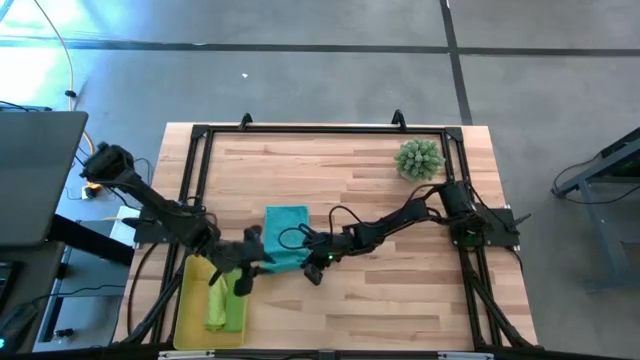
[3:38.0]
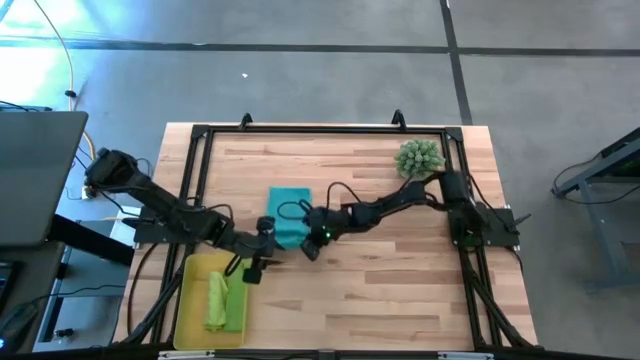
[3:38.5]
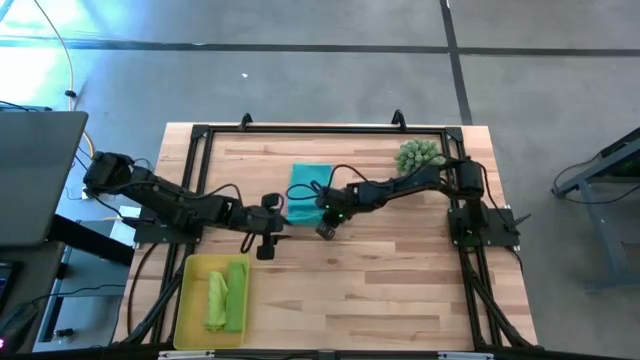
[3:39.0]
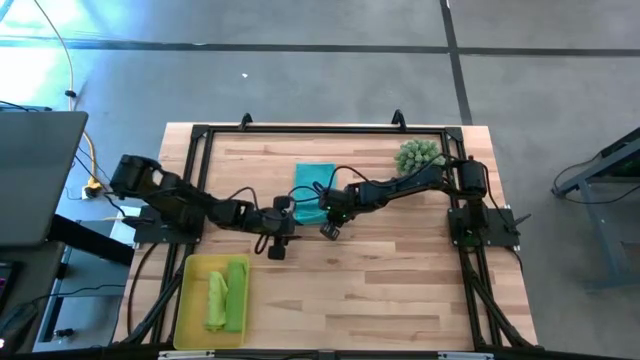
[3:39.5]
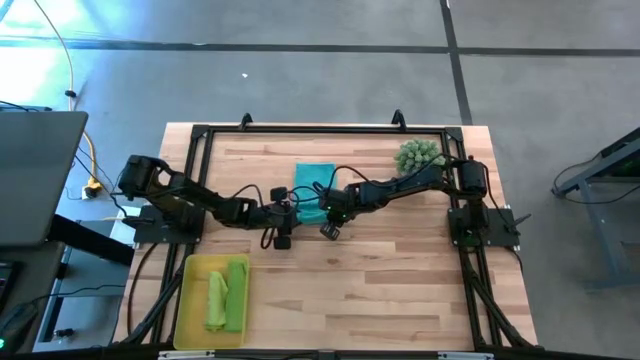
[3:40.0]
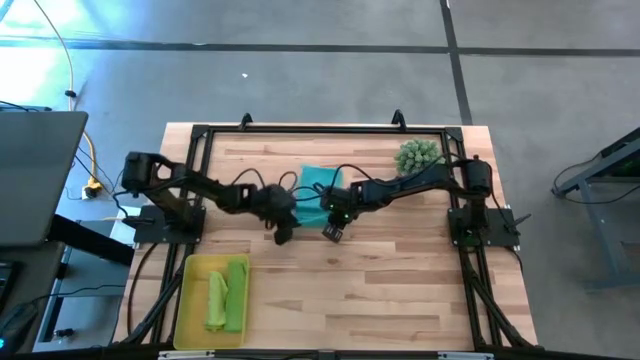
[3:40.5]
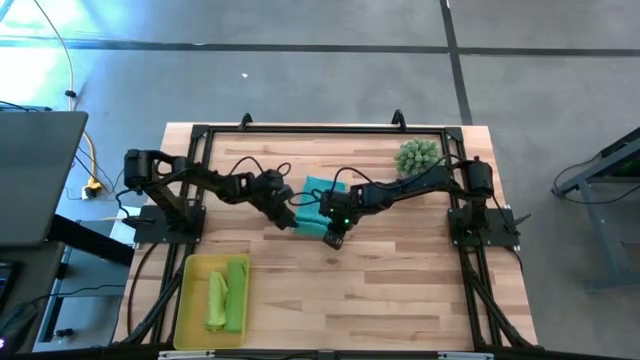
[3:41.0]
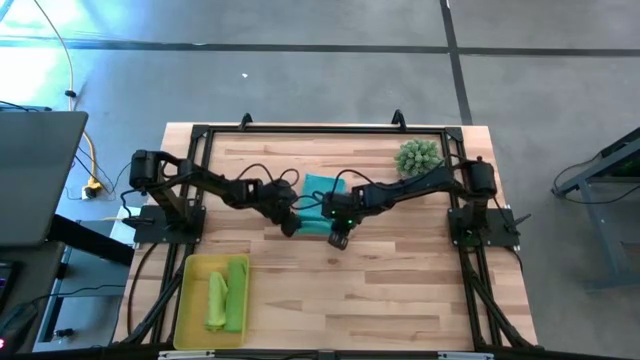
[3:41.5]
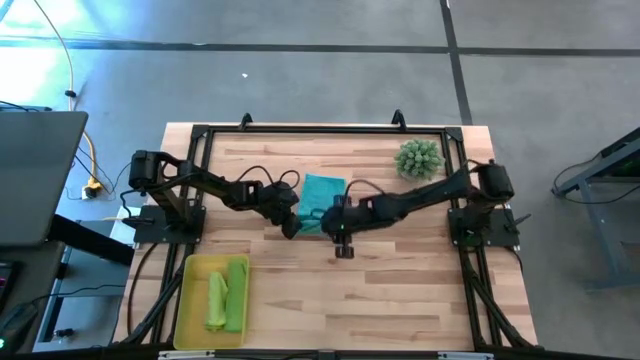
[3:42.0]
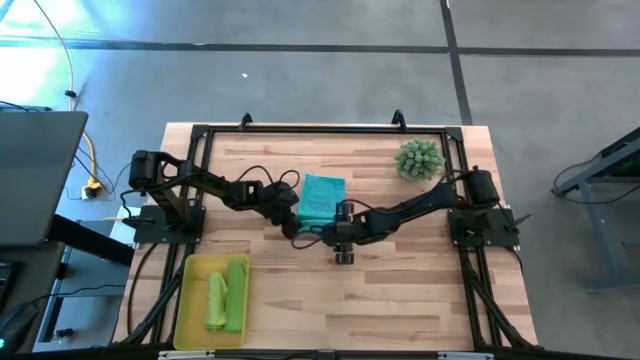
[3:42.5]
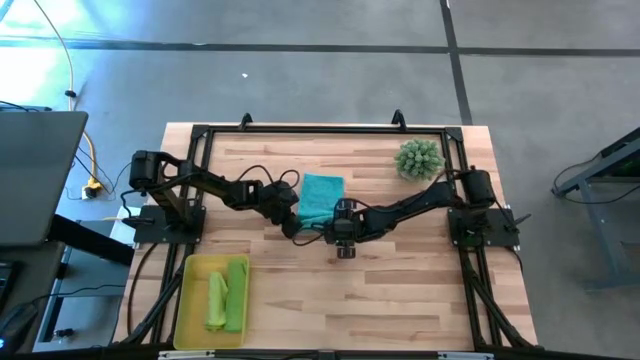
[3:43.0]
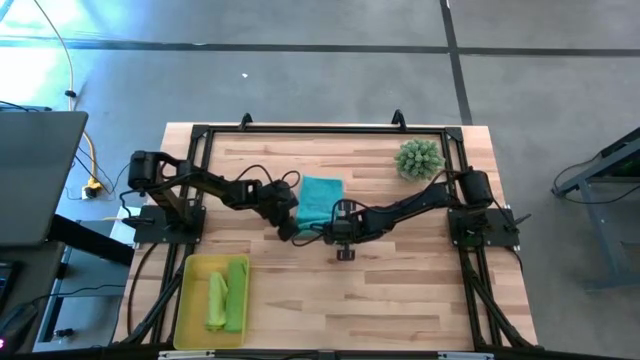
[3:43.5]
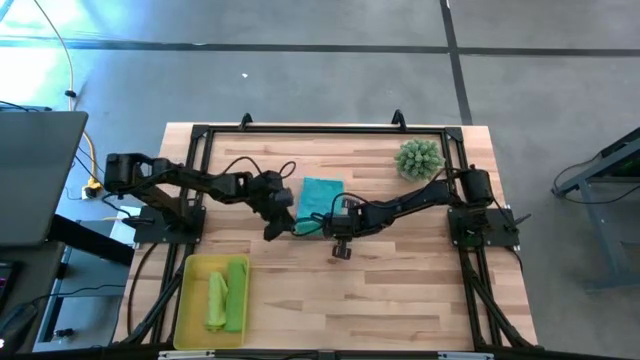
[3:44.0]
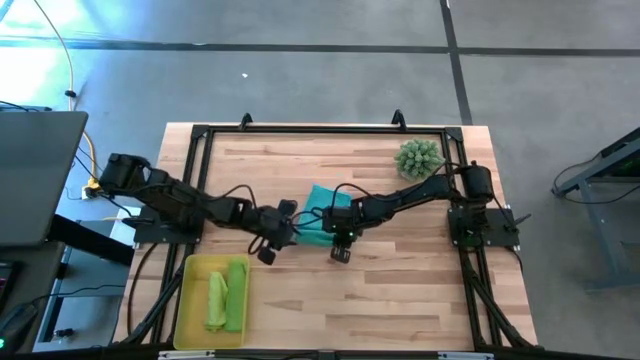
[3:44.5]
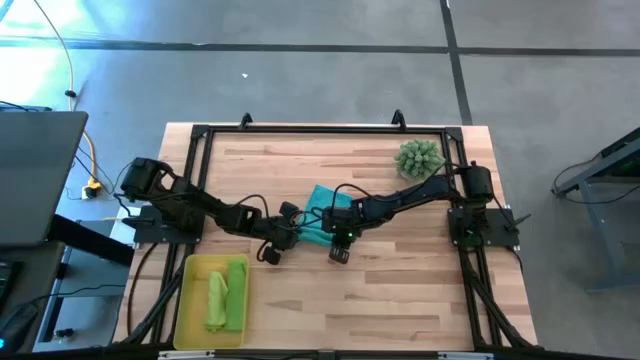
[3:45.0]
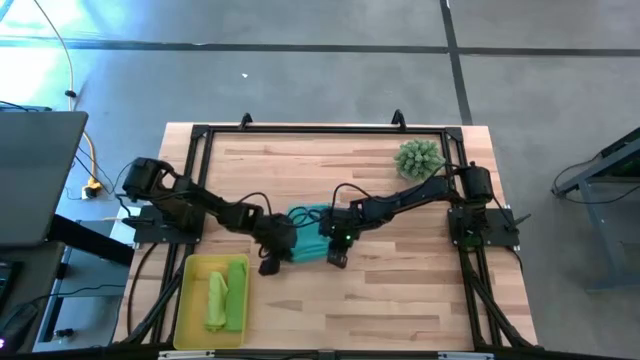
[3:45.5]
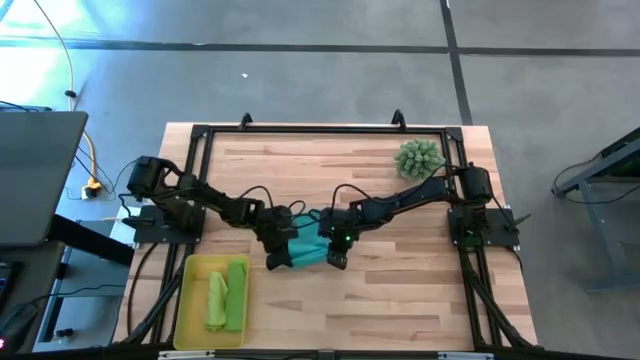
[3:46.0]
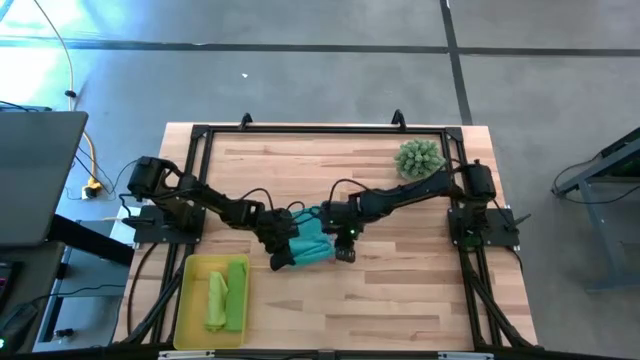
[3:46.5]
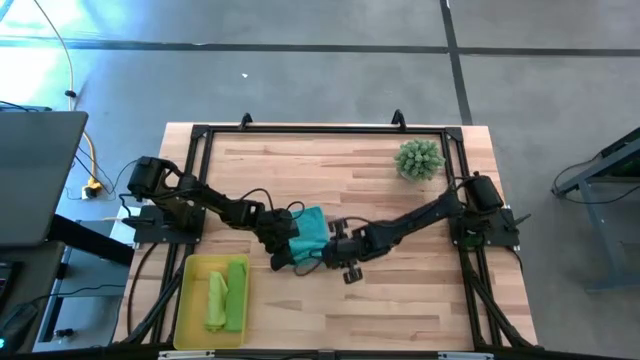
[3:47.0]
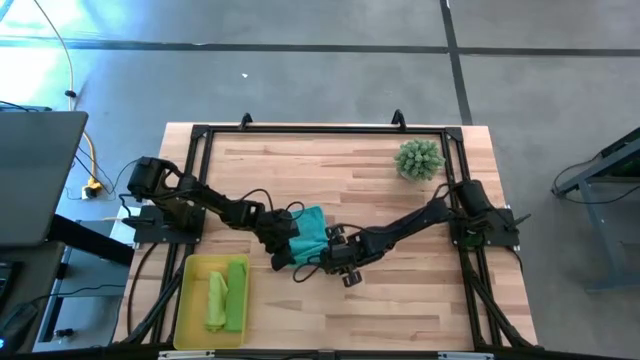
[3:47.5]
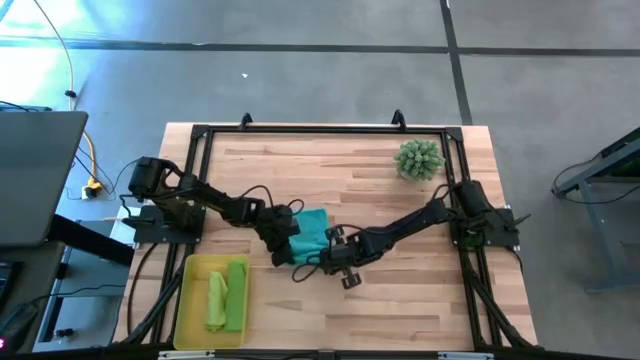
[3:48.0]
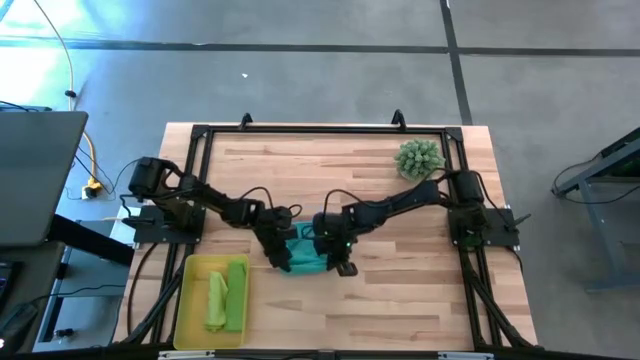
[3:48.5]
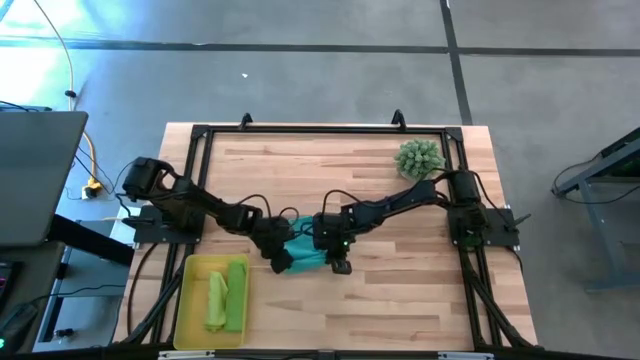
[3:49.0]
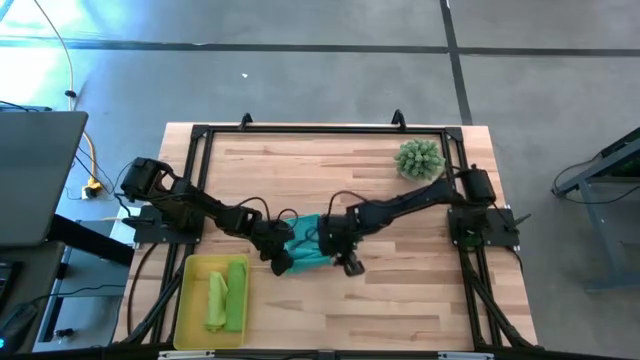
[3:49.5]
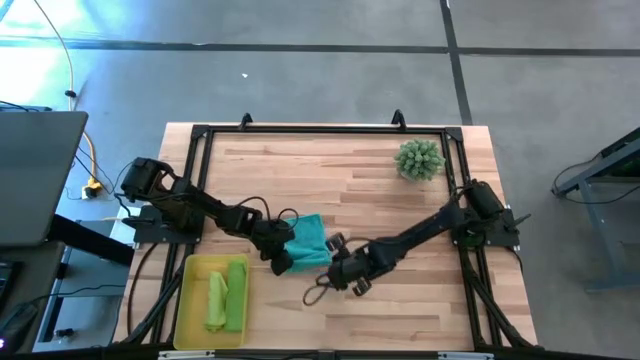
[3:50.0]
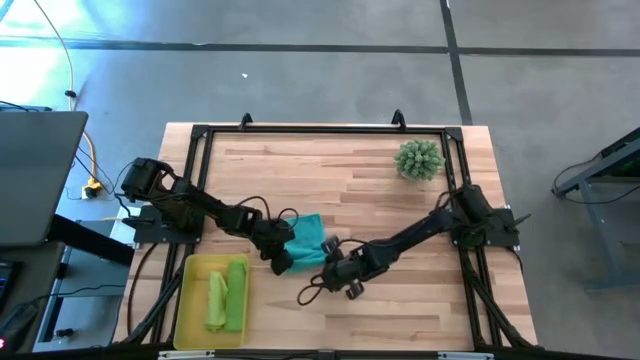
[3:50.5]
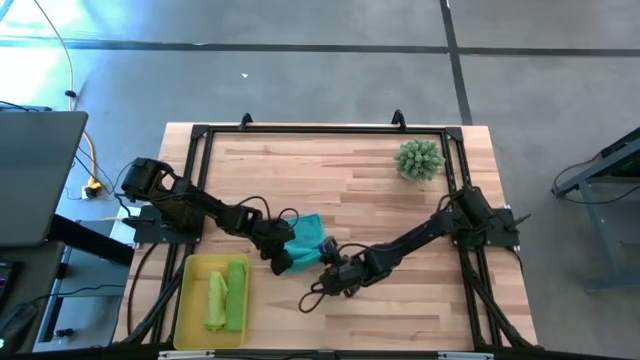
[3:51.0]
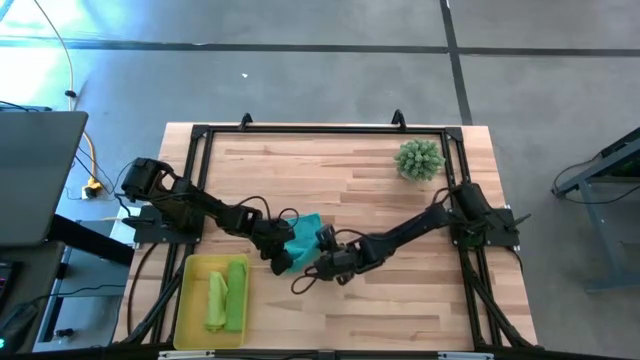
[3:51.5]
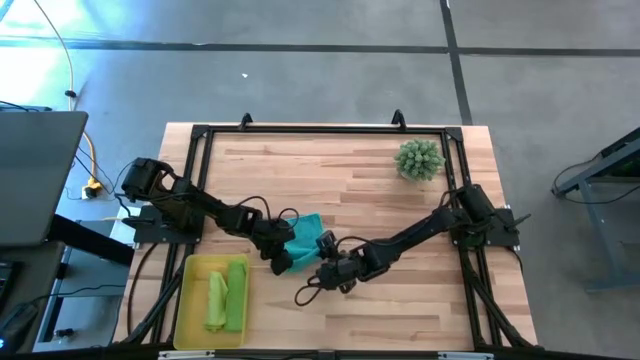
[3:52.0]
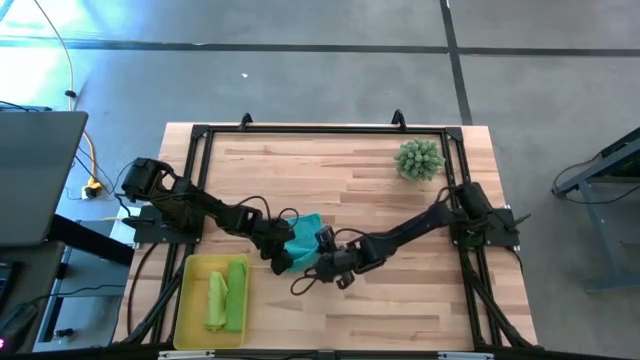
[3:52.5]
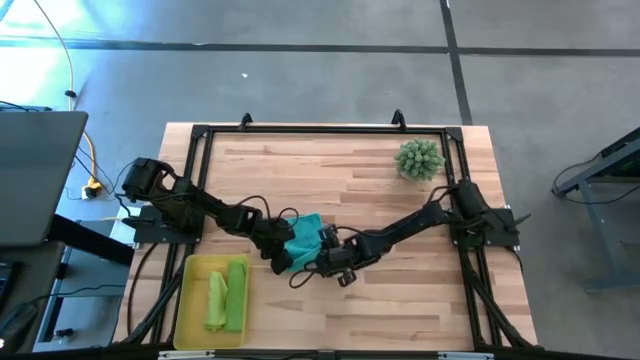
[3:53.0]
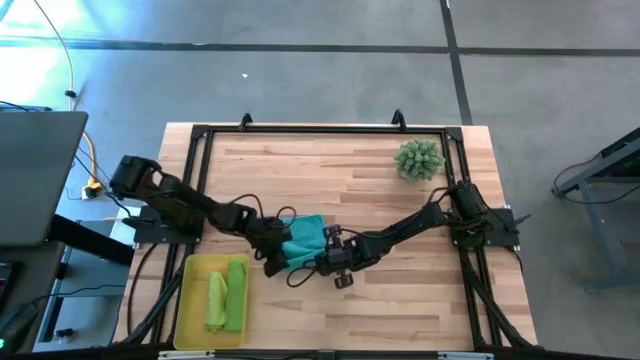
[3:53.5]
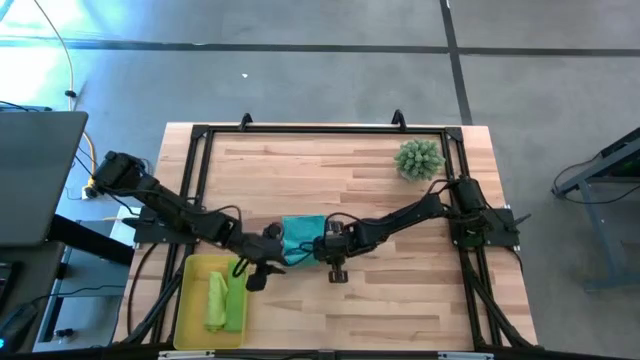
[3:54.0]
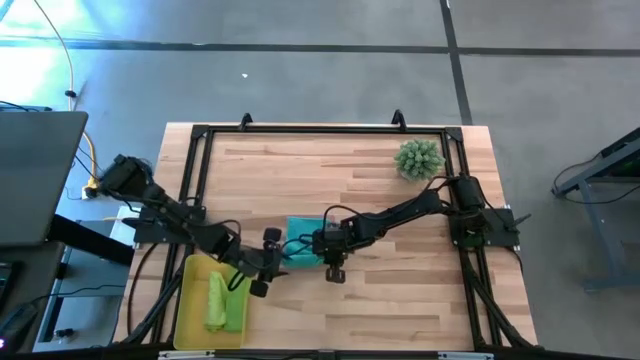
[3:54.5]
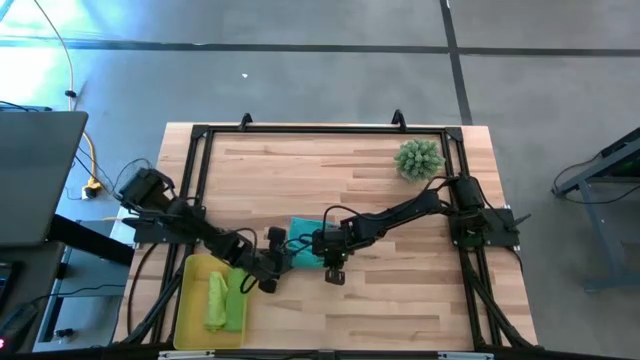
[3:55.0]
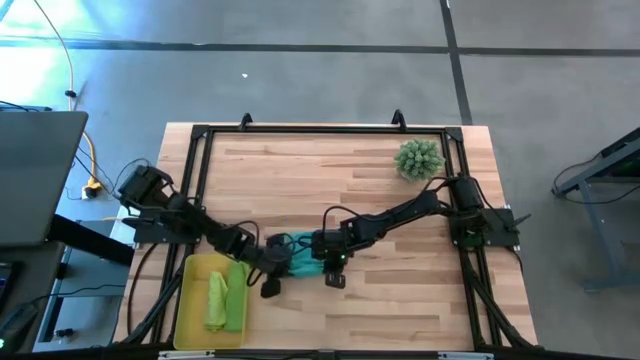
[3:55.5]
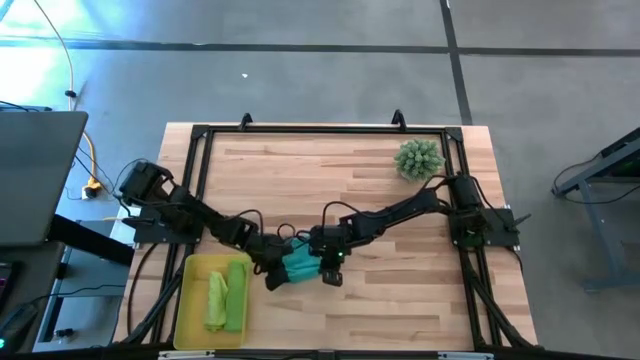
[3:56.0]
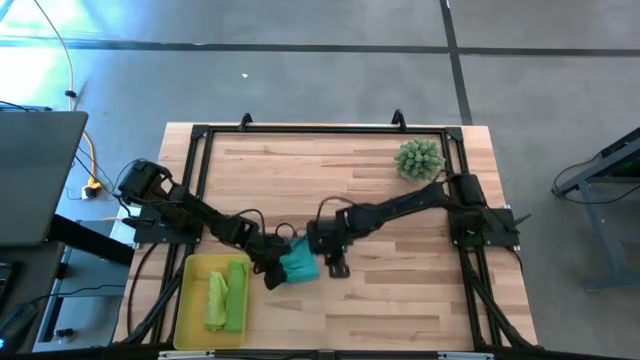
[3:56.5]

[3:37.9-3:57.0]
Task: Roll microfiber towels into tight, uniform cylinder then place into a basket
Roll the blue microfiber towel

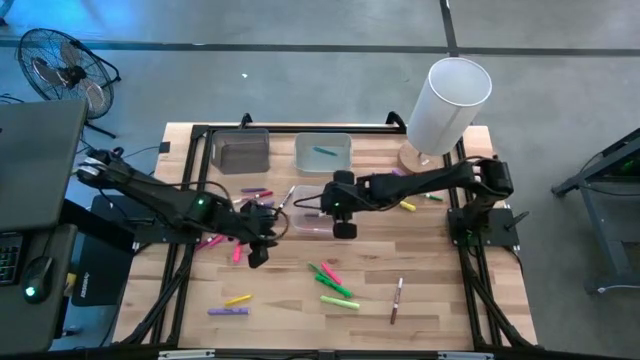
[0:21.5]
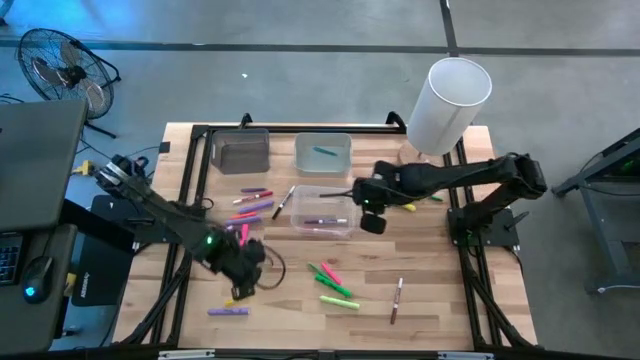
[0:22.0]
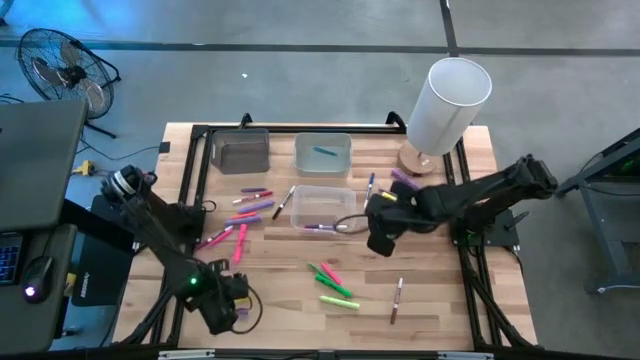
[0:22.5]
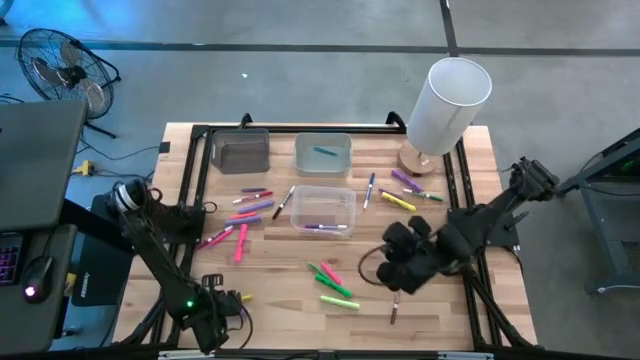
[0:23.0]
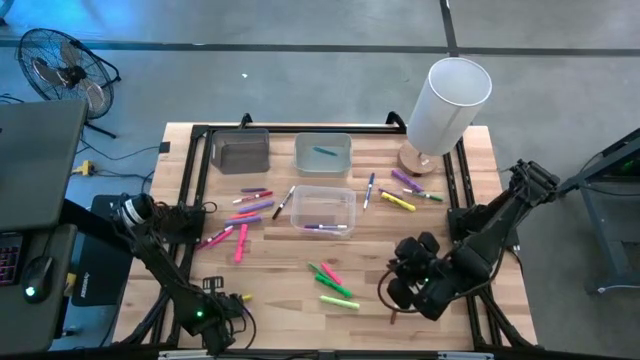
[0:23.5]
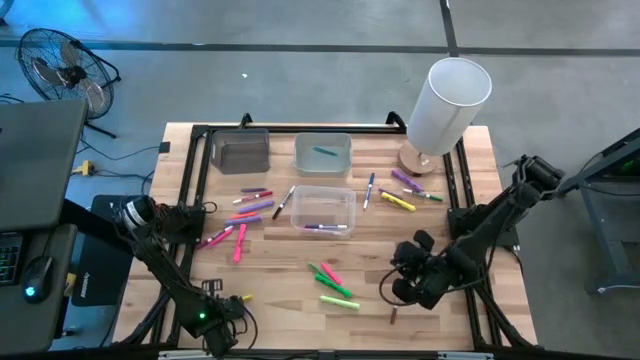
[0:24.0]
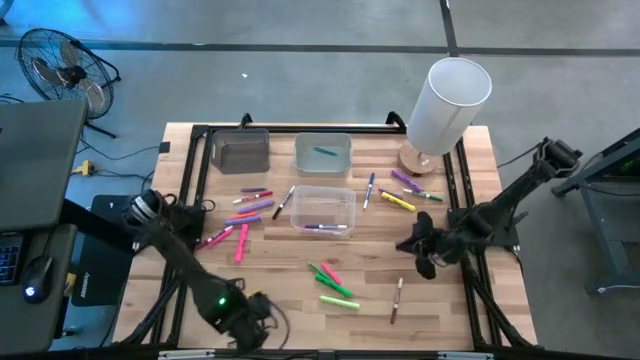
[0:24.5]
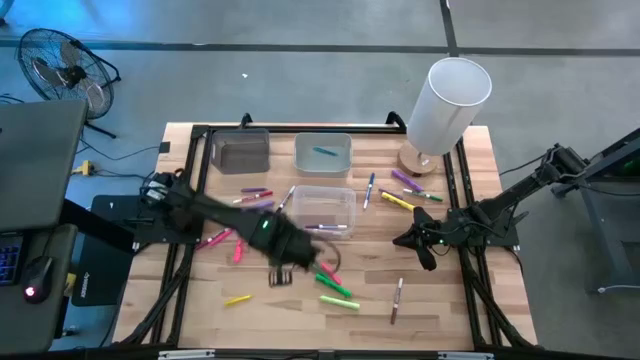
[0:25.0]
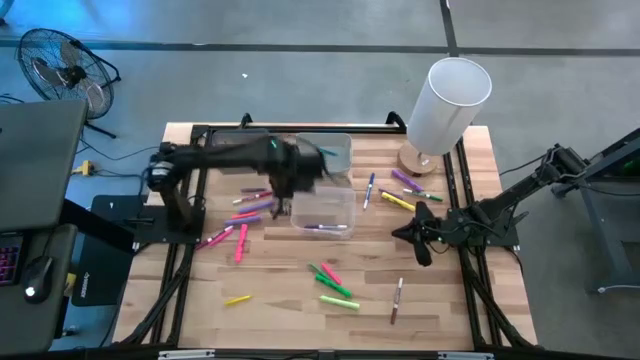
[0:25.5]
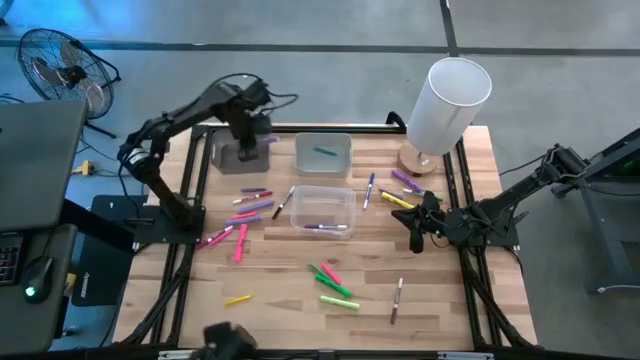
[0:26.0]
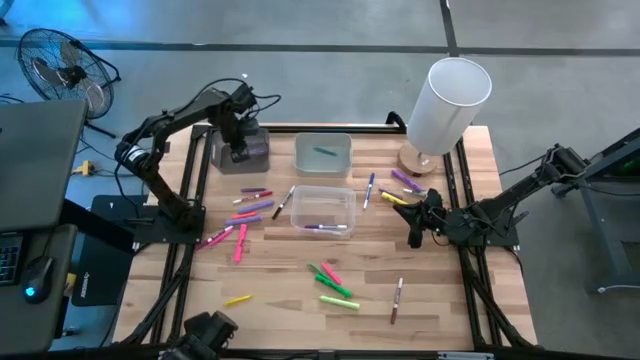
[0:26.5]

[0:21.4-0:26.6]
Task: Pick & Place Markers
Put the violet highlighter into the black bin
